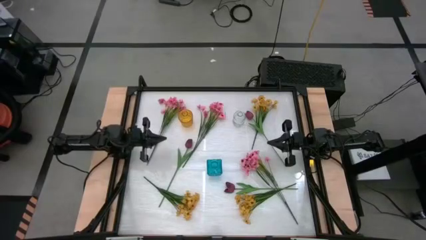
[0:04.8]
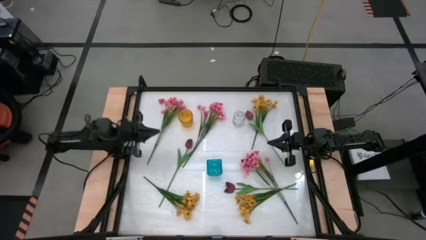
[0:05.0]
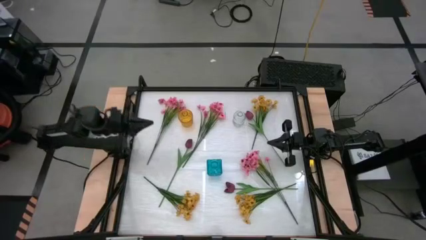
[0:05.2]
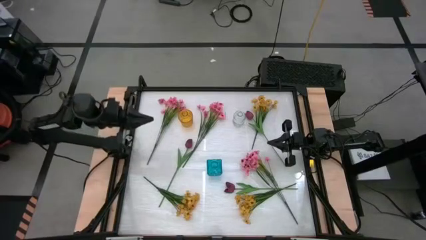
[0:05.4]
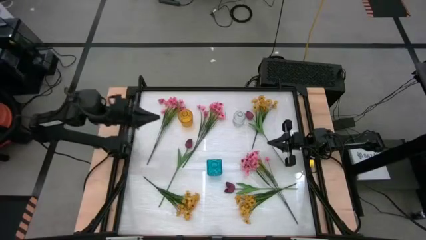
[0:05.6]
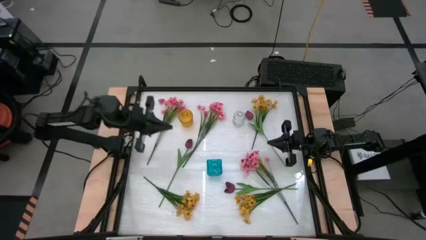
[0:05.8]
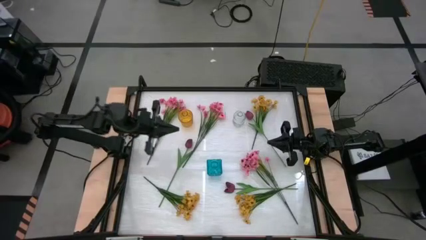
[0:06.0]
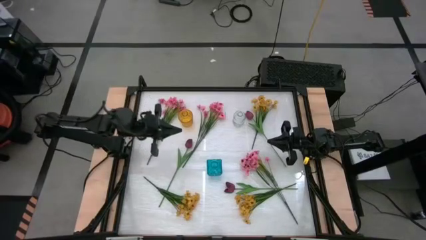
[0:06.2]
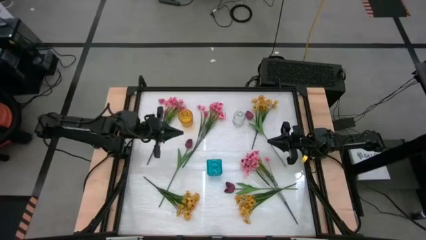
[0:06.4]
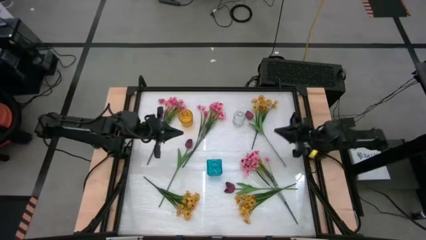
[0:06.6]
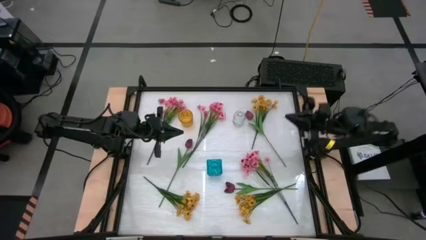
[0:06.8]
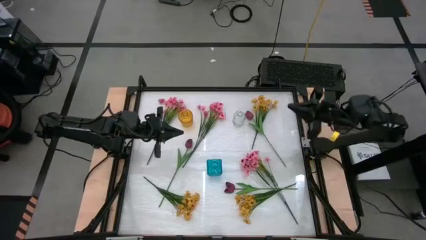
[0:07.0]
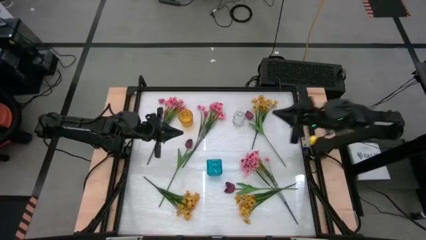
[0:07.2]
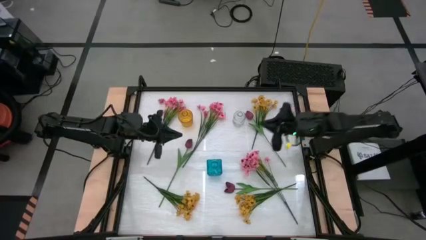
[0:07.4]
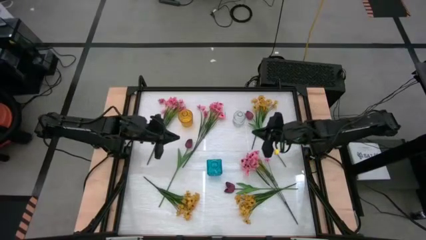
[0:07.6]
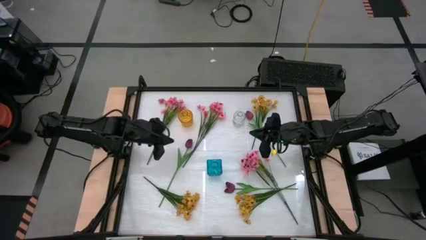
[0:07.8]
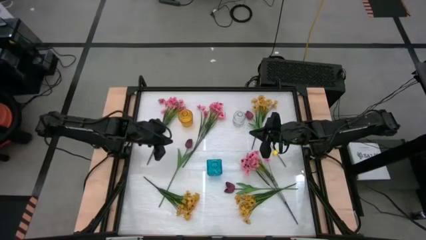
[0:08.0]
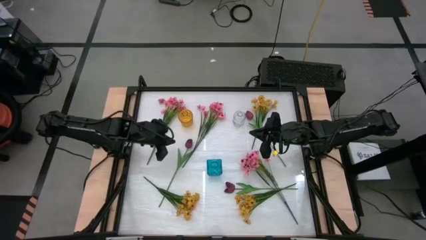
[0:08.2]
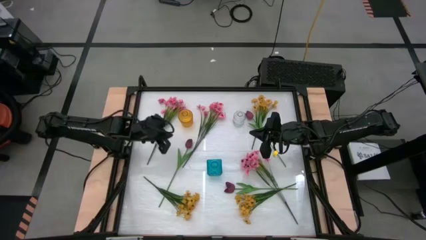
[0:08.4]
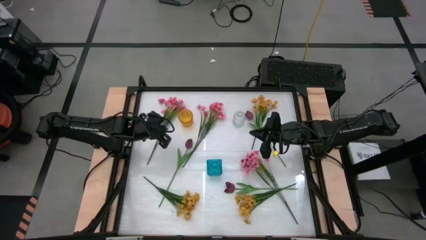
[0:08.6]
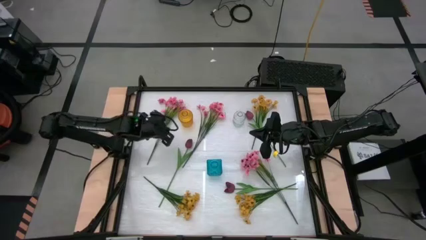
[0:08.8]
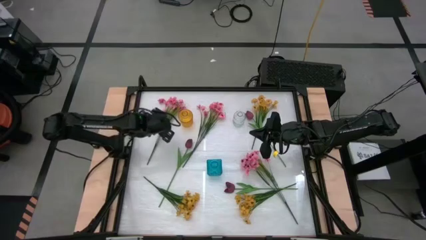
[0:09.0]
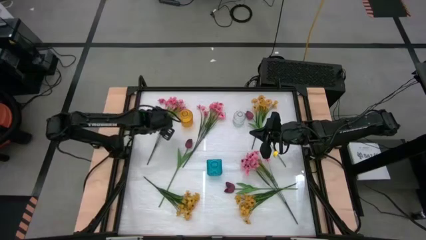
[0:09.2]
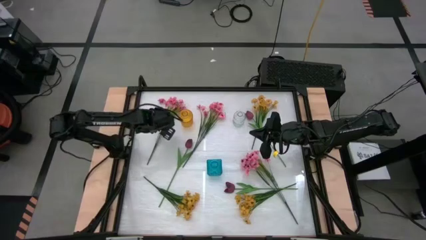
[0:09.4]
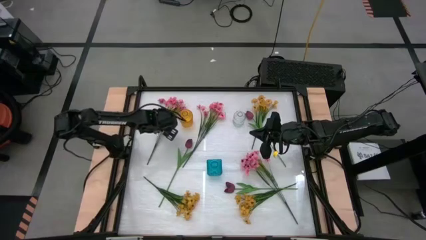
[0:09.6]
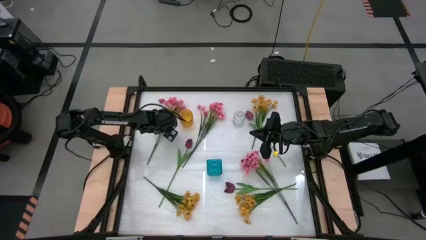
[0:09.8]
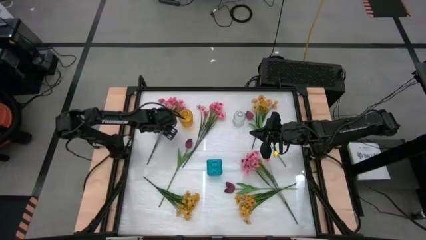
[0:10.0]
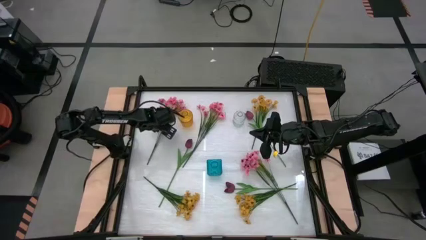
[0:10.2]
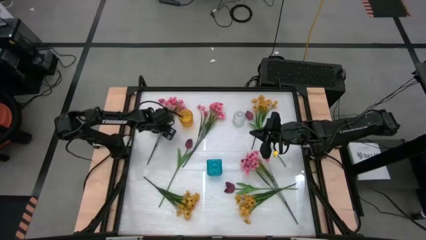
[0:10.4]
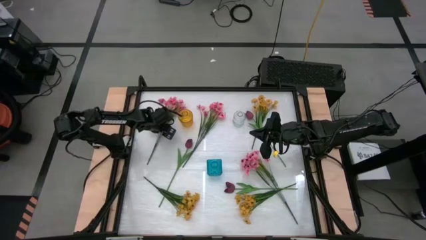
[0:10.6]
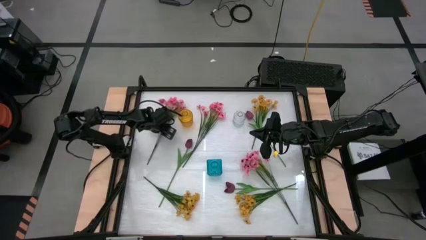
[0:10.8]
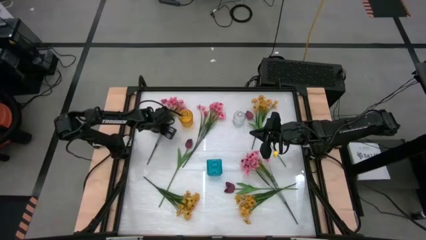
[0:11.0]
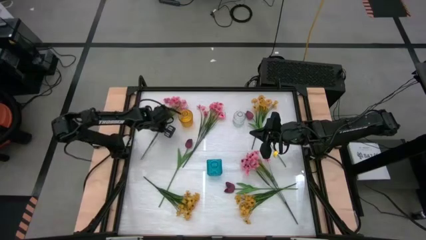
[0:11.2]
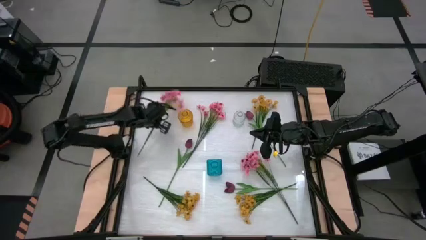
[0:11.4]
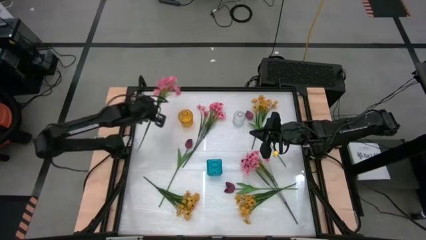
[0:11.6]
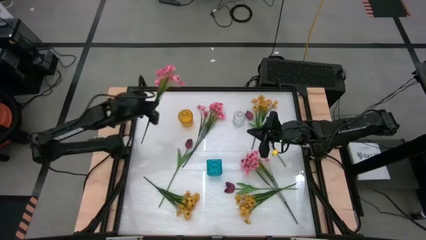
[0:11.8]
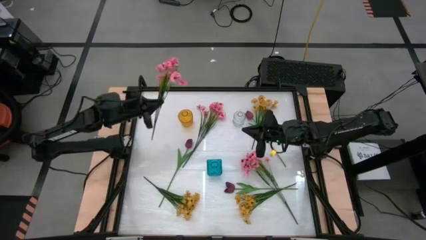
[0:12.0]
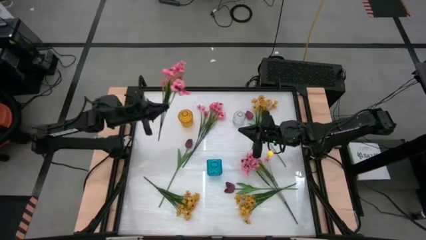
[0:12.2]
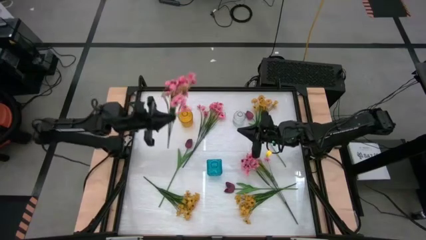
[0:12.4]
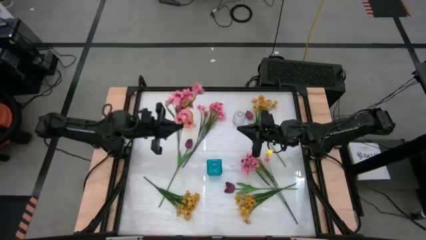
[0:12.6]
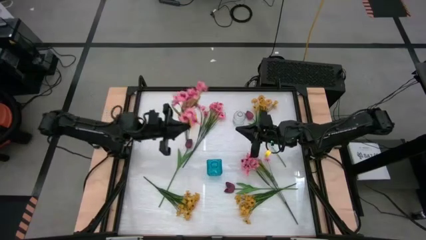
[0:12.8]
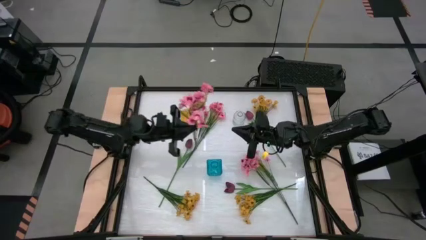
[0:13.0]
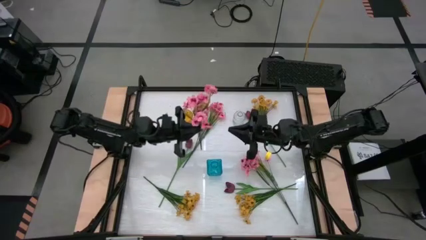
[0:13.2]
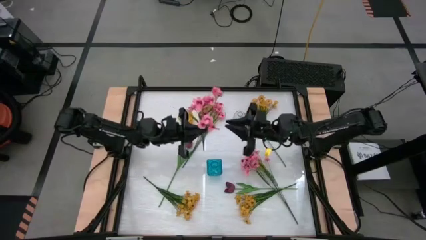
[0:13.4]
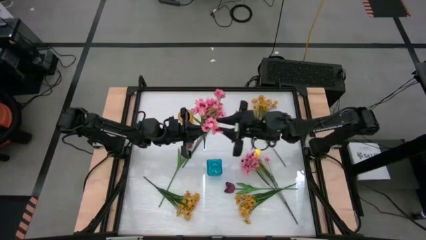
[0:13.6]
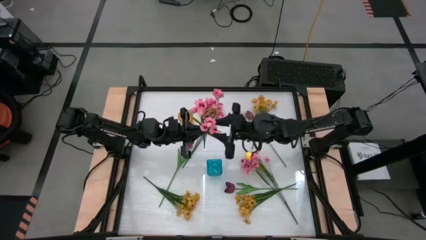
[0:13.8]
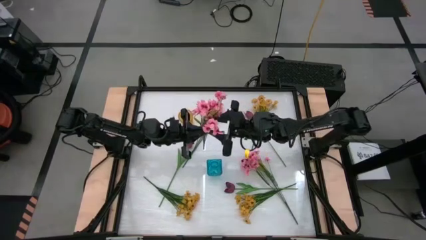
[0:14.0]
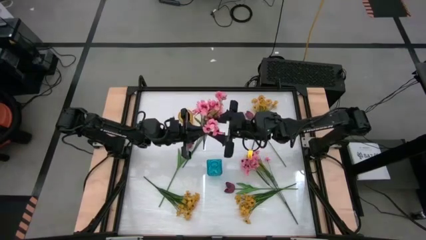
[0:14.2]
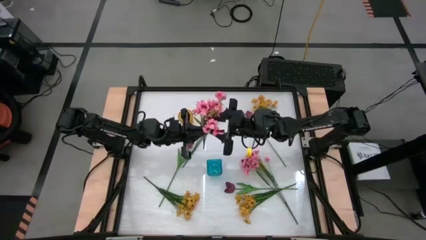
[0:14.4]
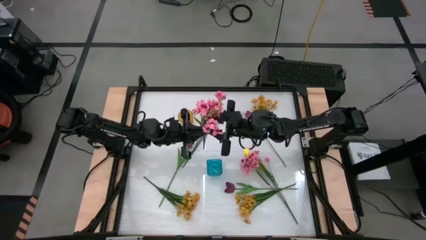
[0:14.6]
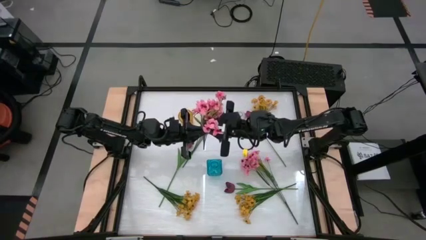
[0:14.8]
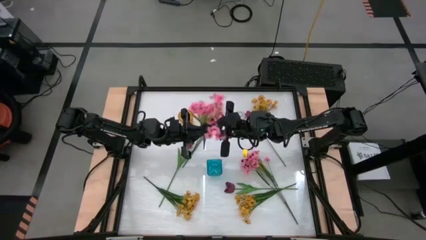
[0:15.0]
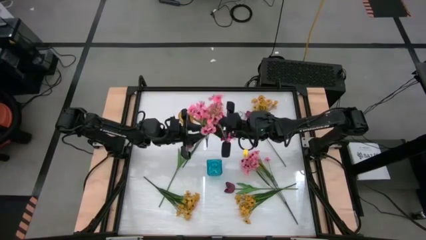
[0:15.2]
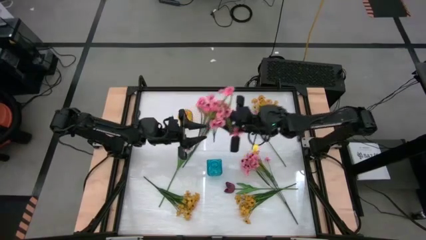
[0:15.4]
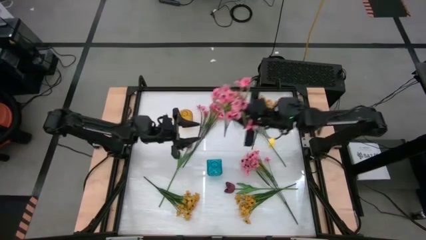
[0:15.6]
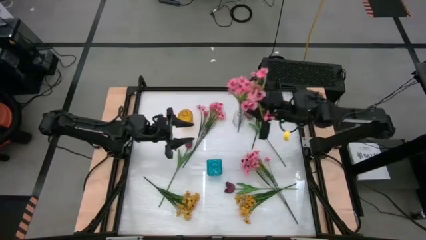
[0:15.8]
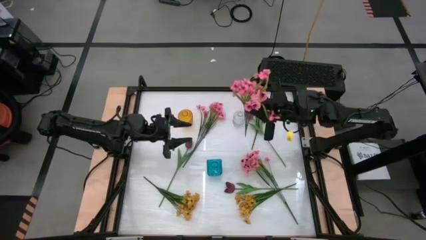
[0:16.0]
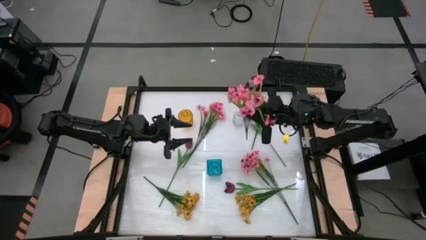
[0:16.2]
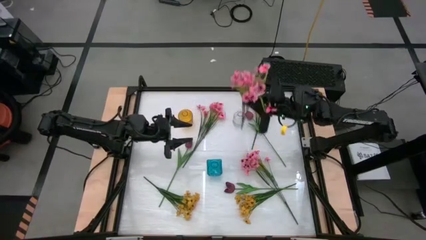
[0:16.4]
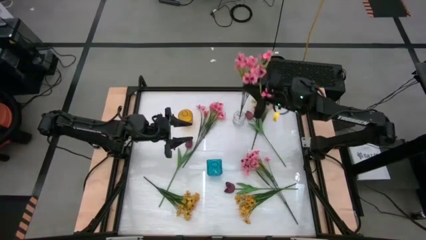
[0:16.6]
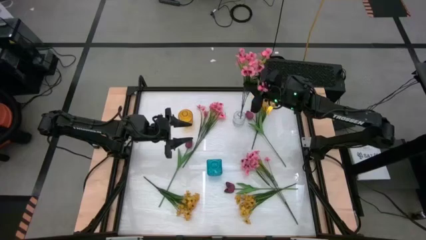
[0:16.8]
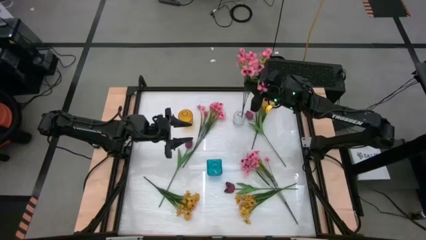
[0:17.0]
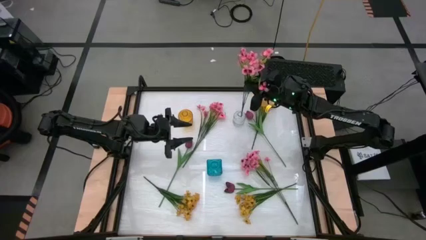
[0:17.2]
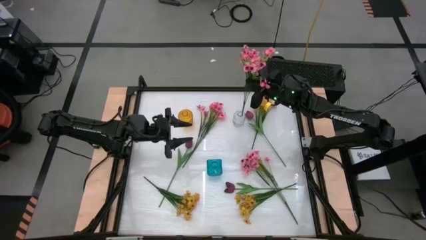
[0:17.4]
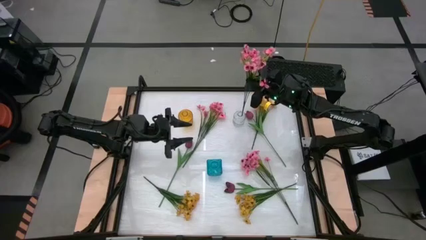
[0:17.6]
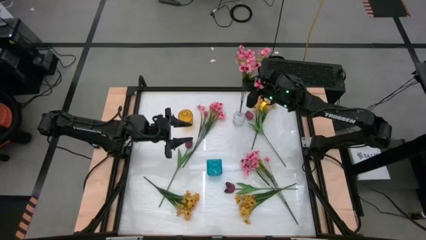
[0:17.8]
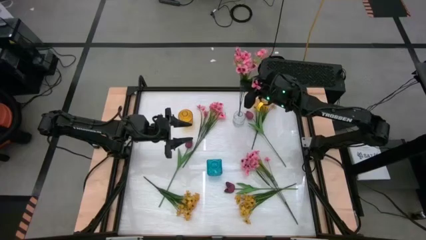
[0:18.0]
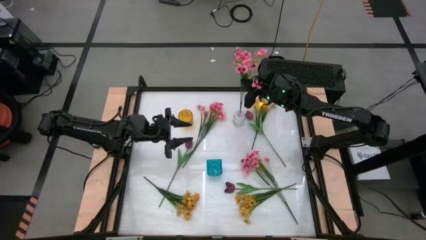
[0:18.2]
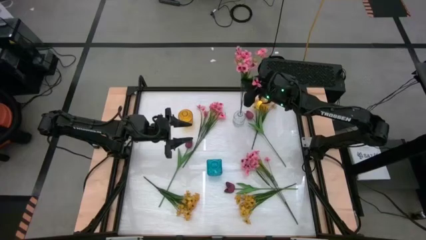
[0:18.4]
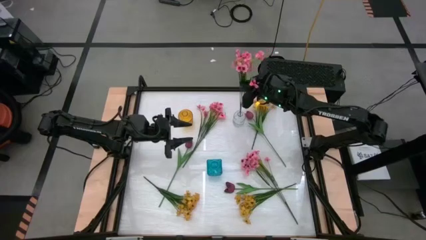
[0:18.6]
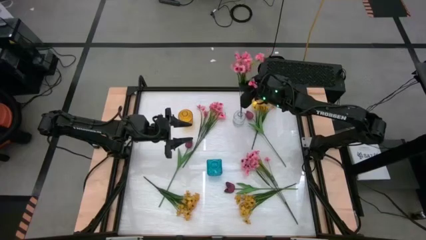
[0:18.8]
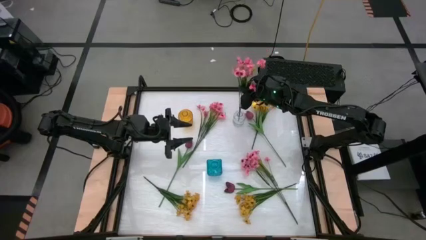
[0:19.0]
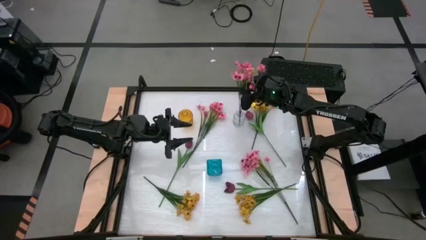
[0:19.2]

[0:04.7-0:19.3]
Task: Sort flowers into vase by color
Put the top left pink flower into the transparent vase
